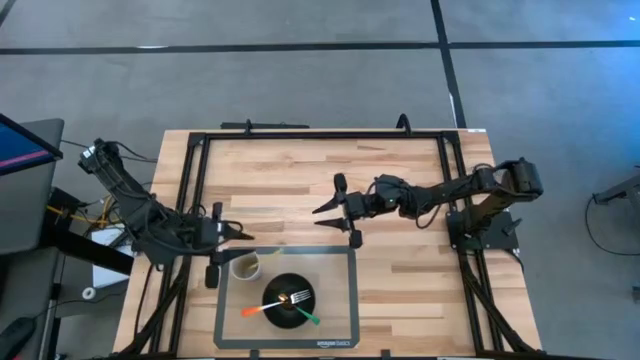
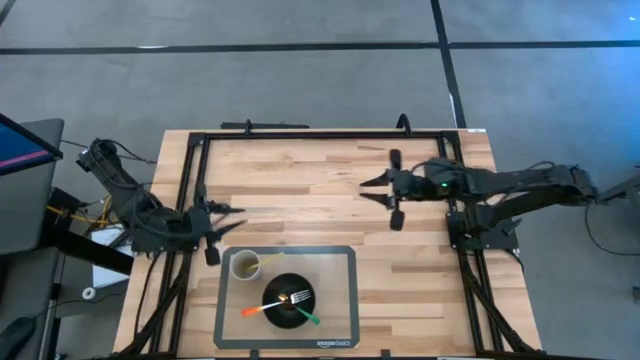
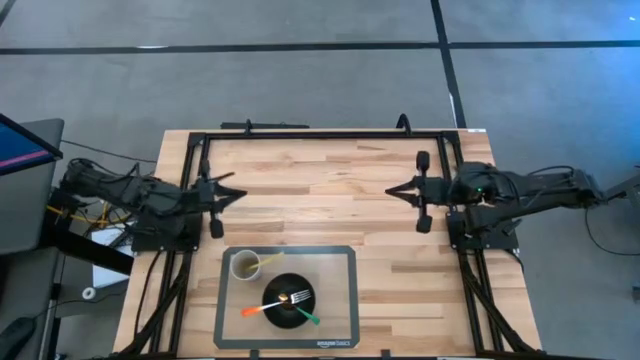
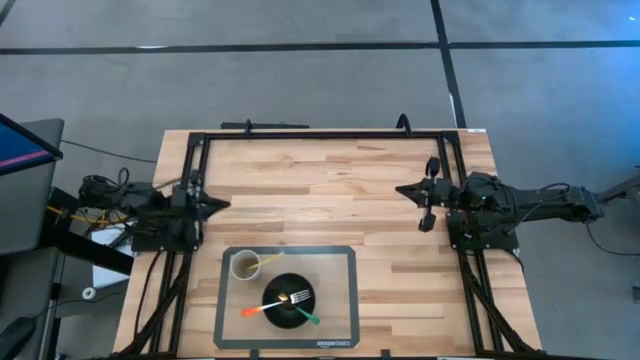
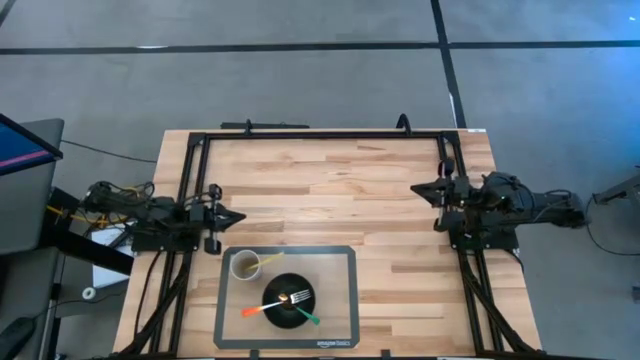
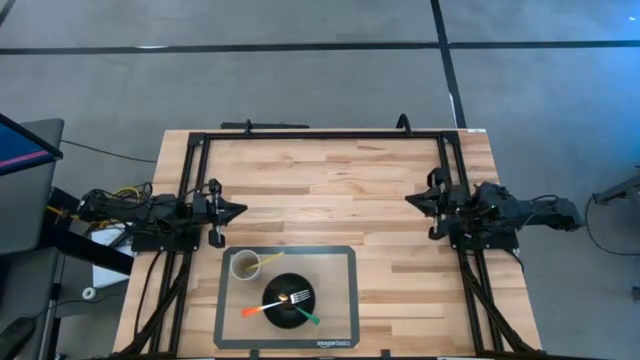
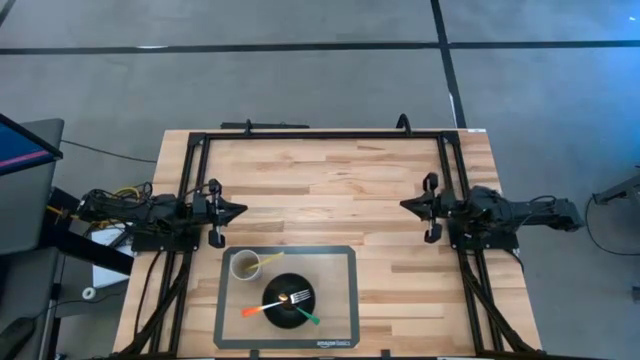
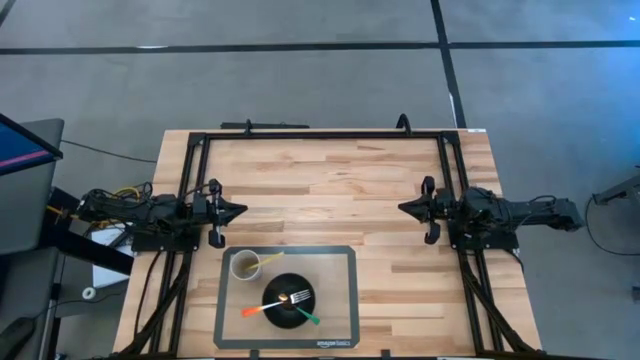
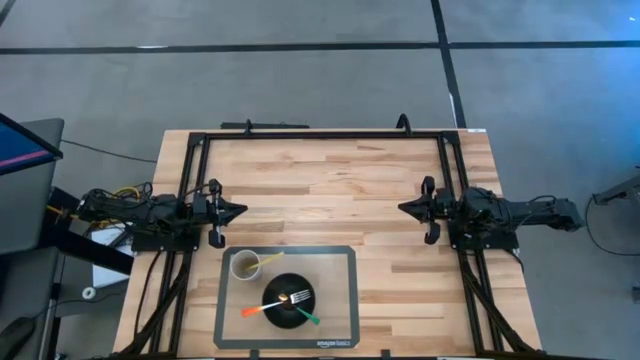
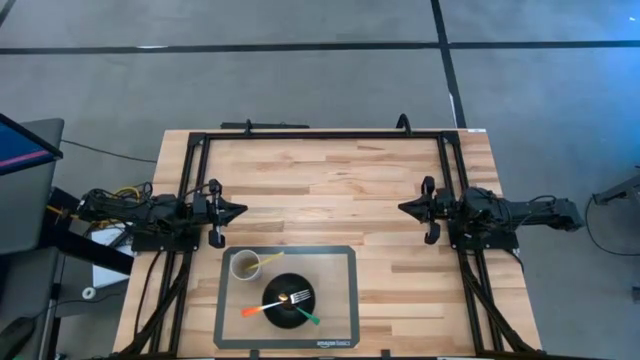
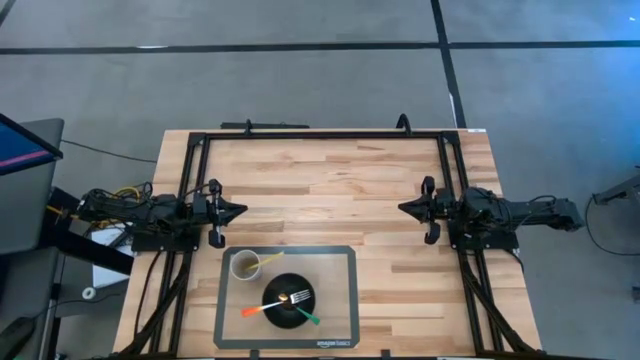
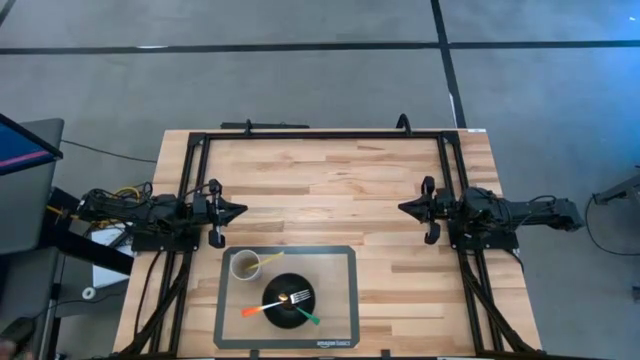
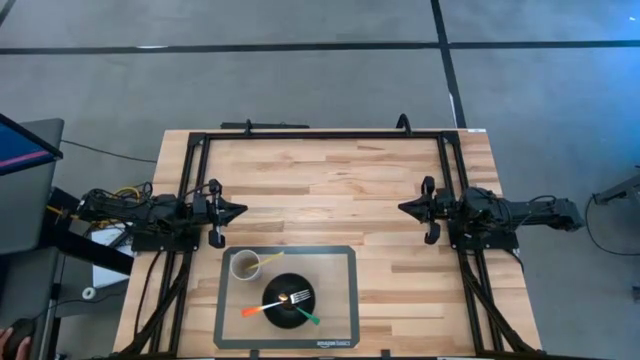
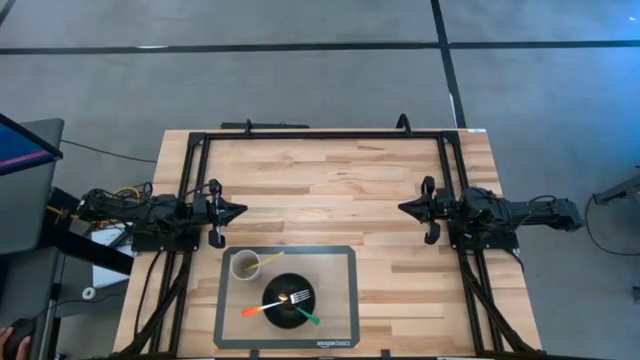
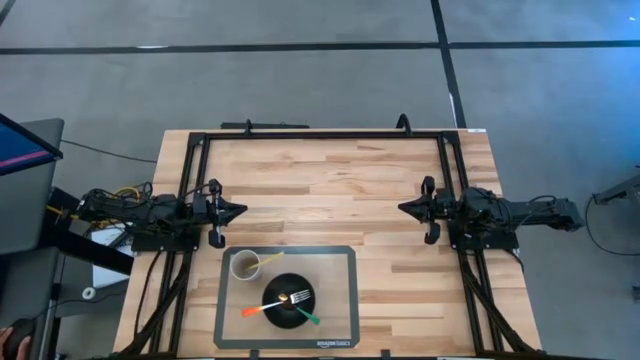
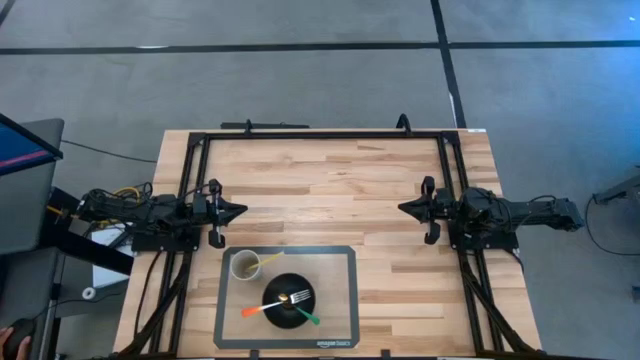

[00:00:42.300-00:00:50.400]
Task: Pick & Place Utensil
Return to Home Position

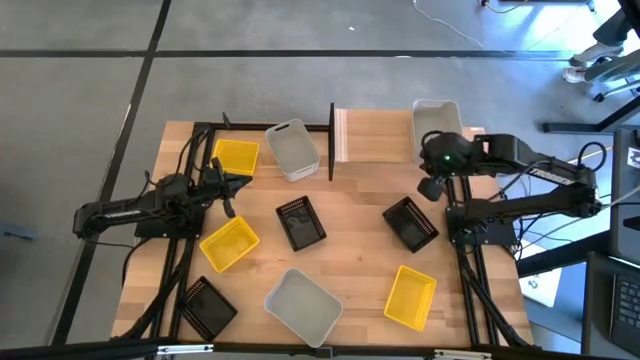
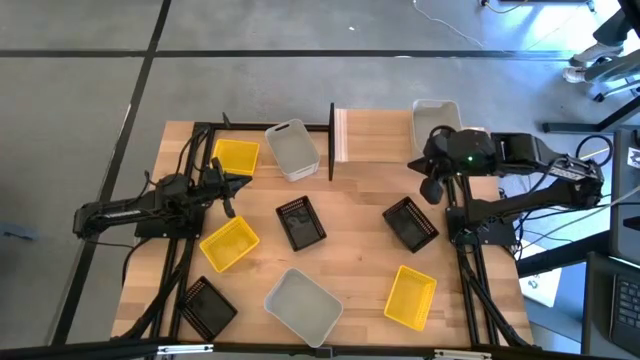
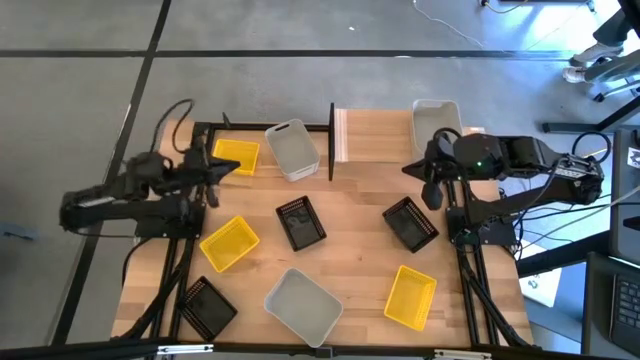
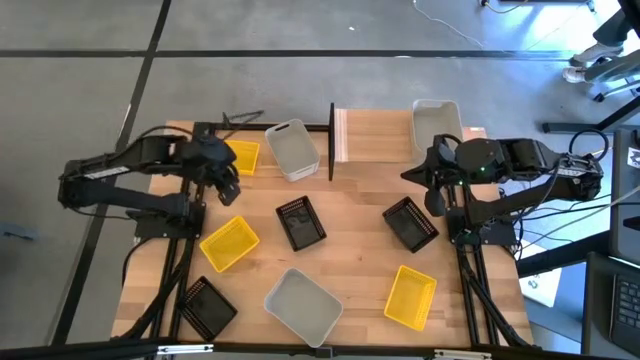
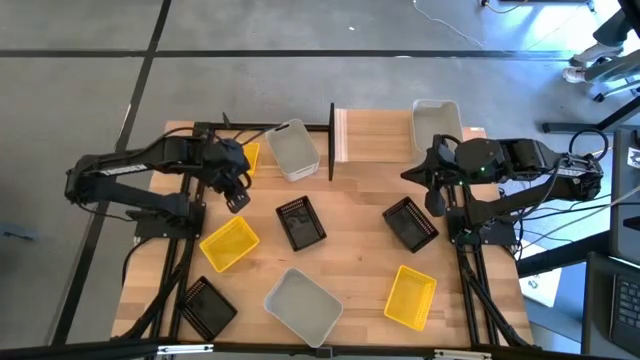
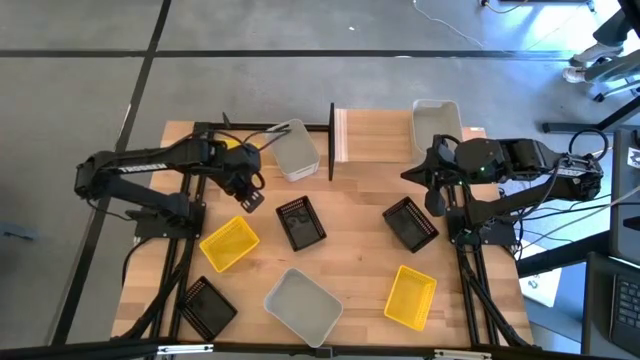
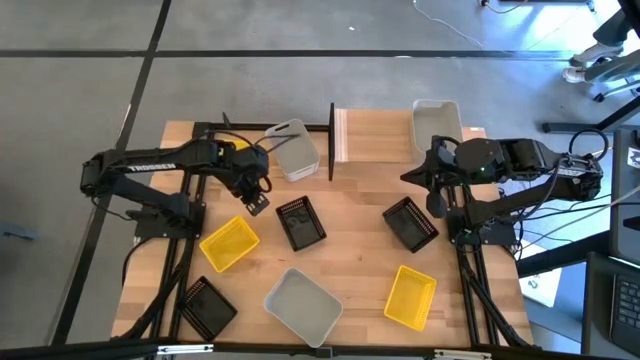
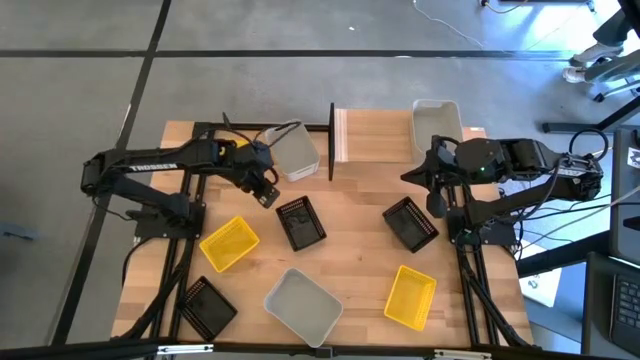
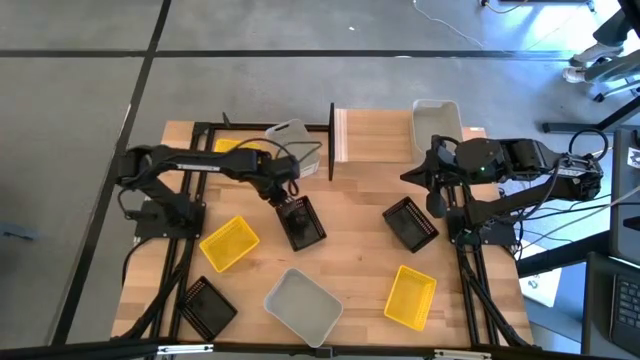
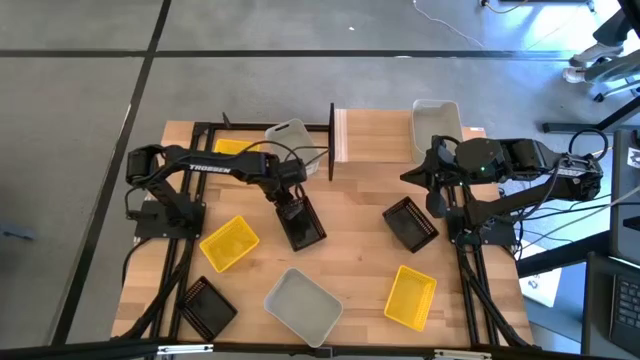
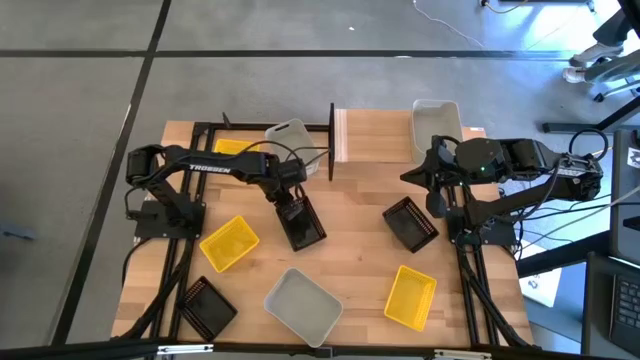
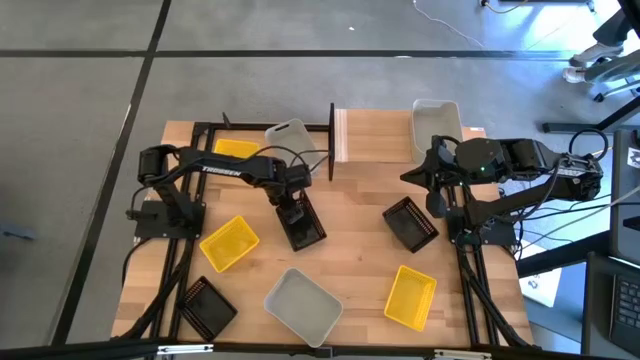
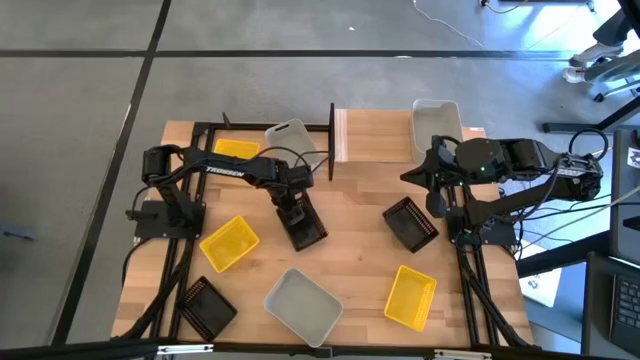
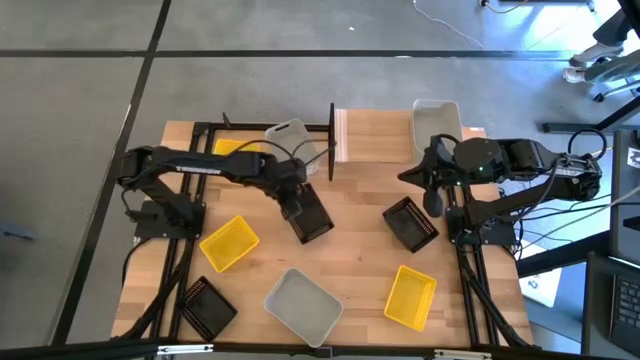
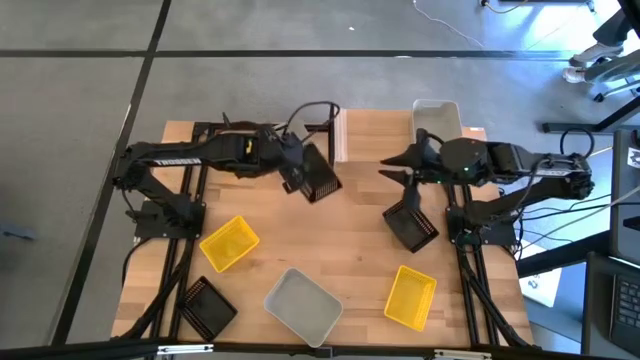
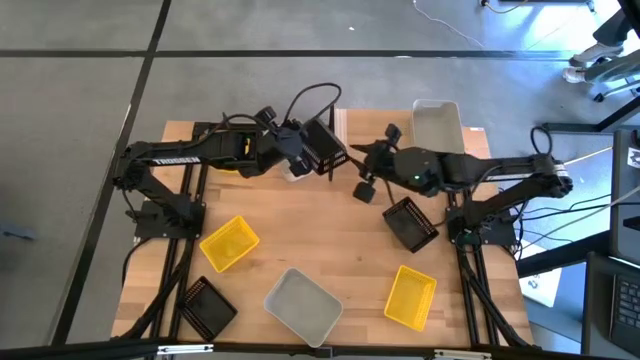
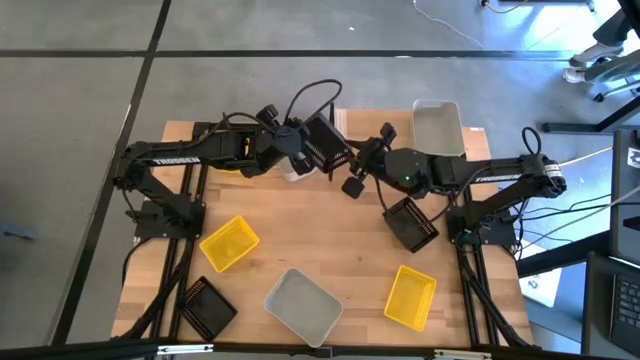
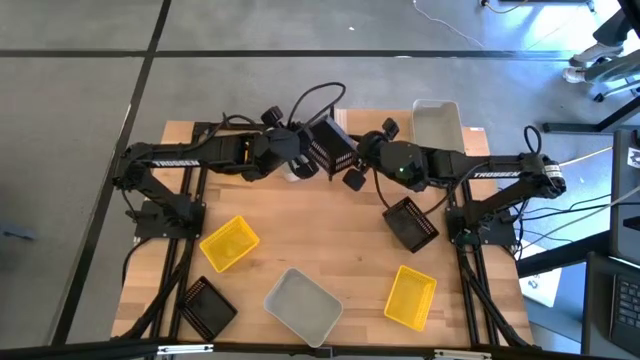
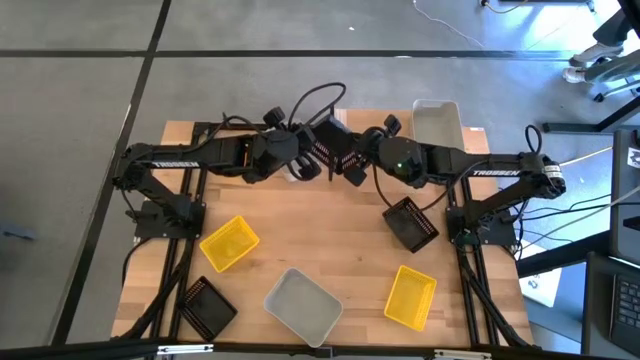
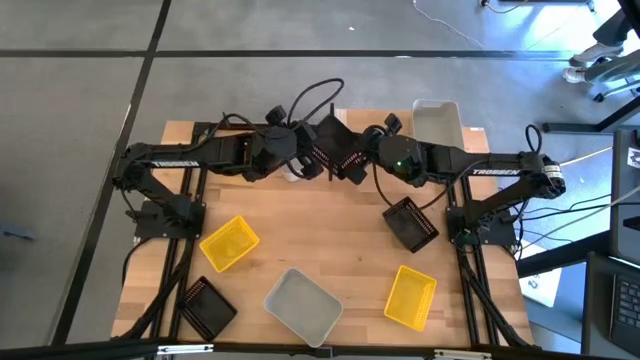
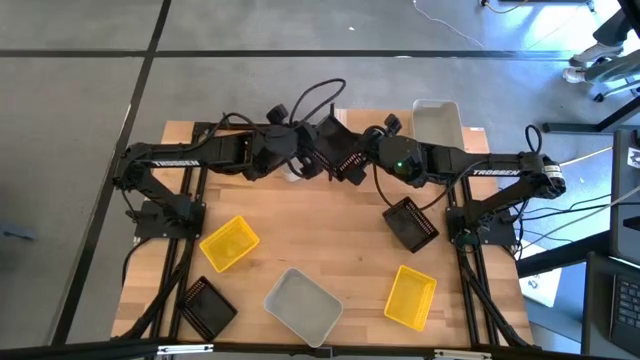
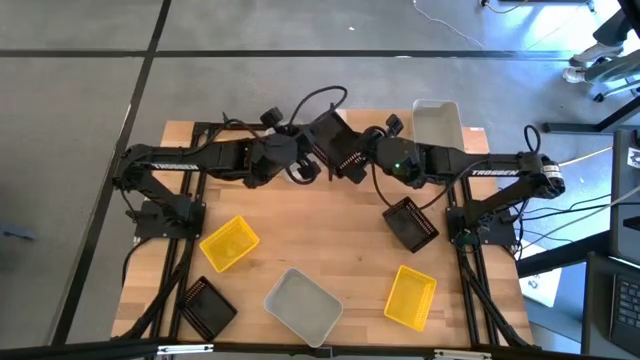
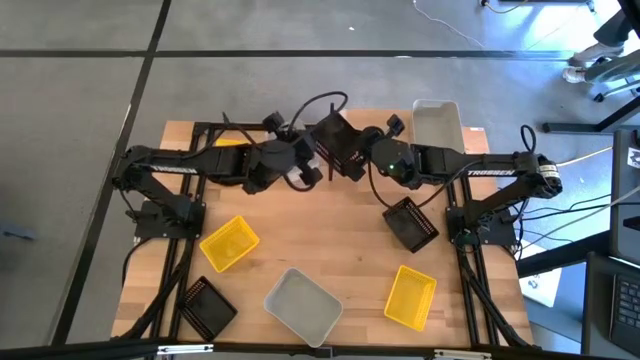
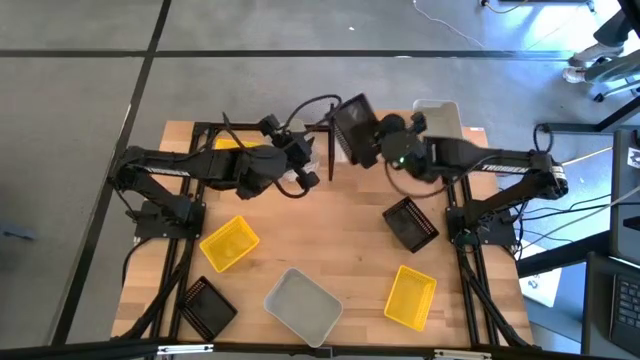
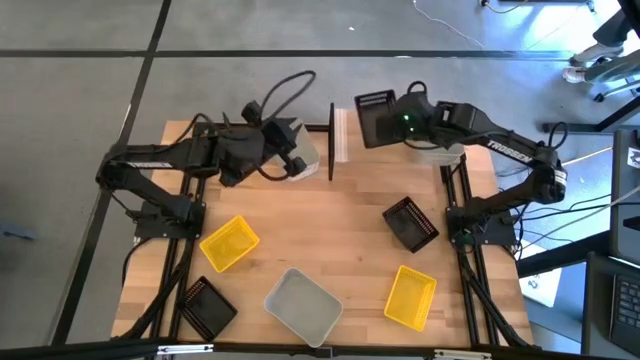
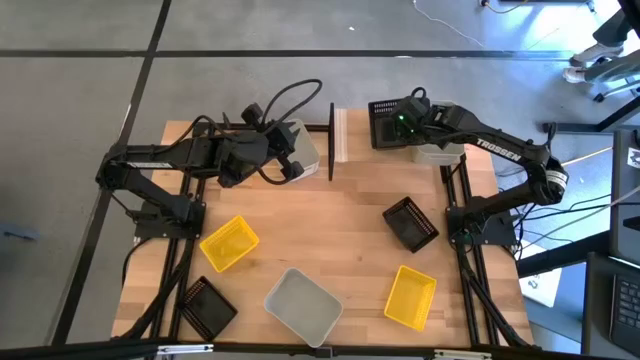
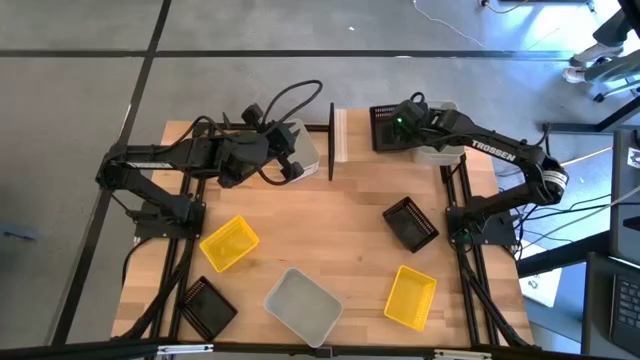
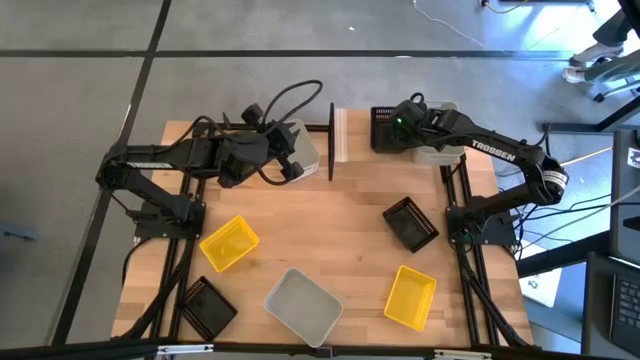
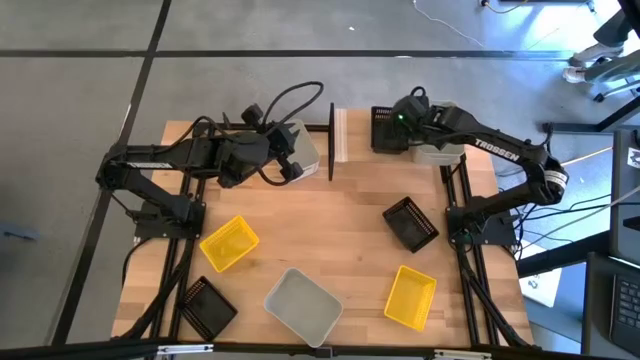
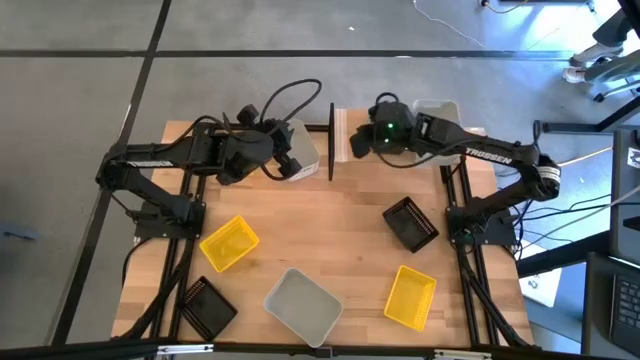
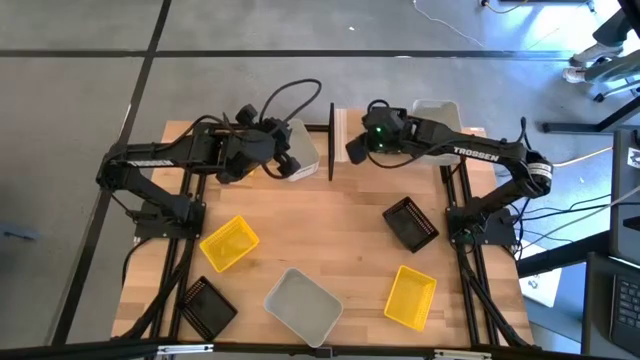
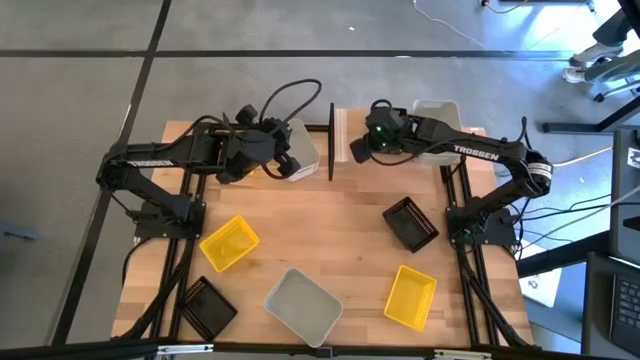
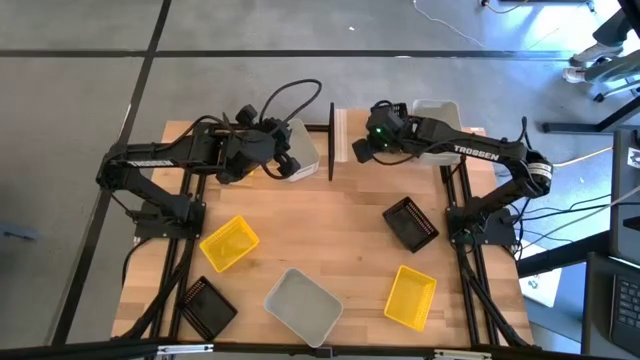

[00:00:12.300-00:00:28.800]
Task: Stack baskets on shelf by color
Put the top middle black bin on the shelf
